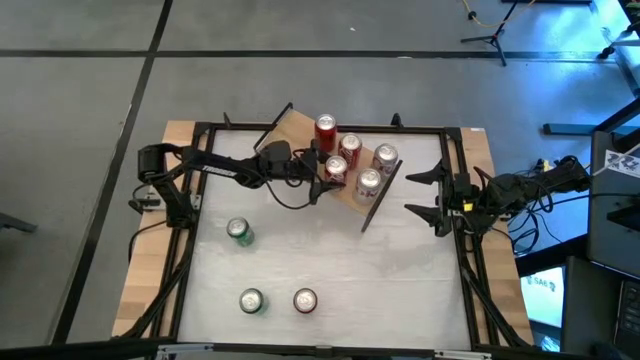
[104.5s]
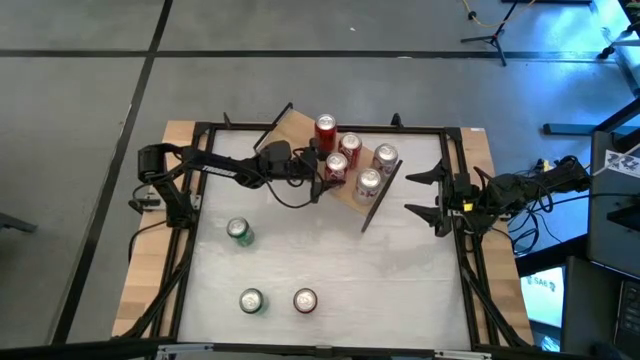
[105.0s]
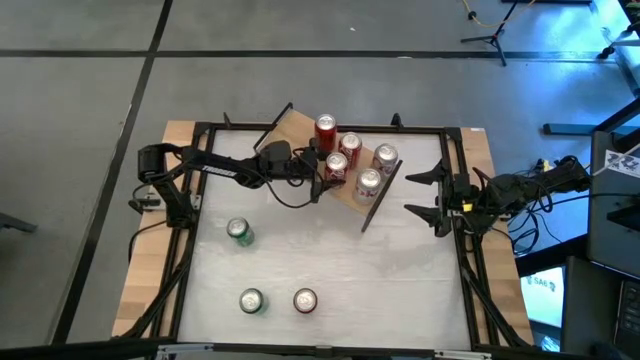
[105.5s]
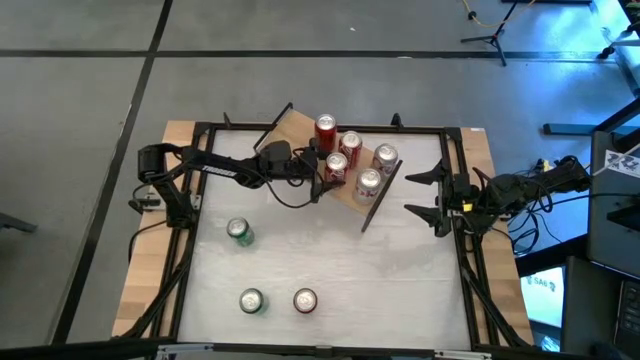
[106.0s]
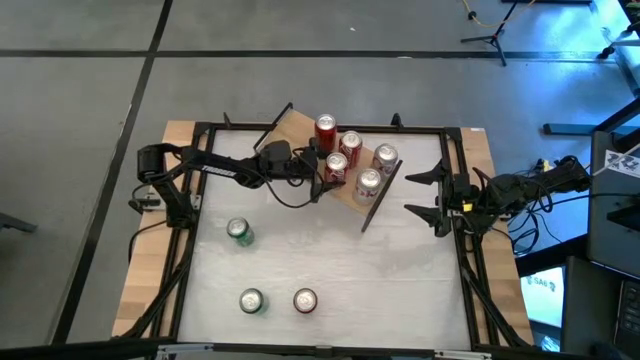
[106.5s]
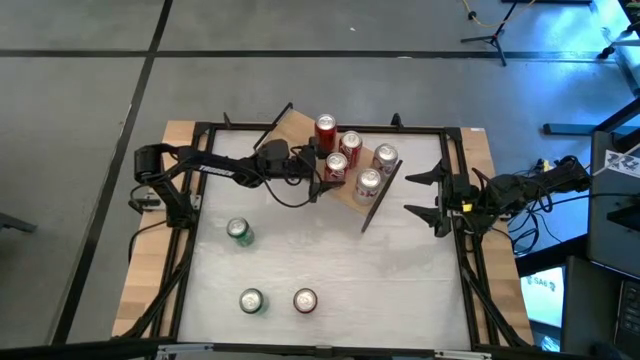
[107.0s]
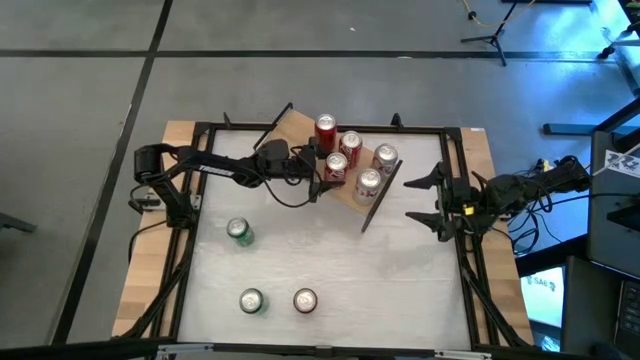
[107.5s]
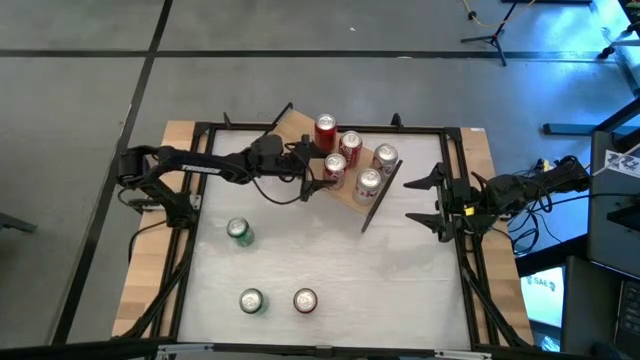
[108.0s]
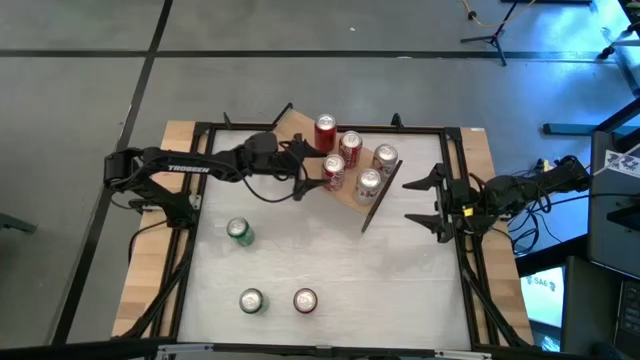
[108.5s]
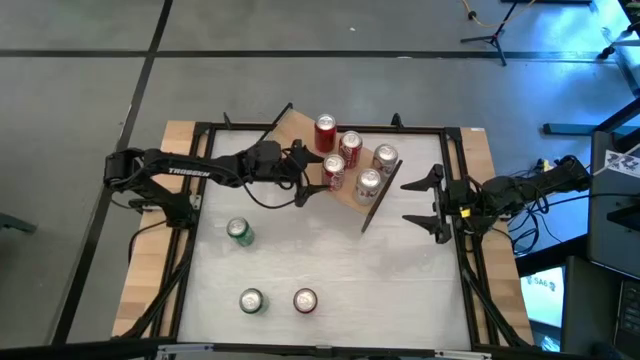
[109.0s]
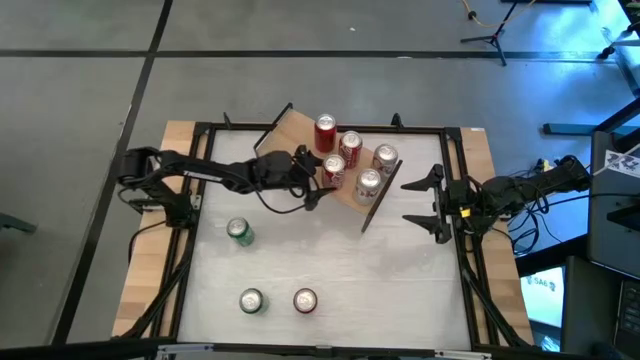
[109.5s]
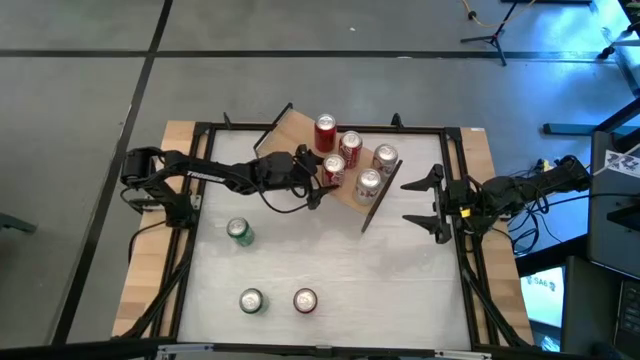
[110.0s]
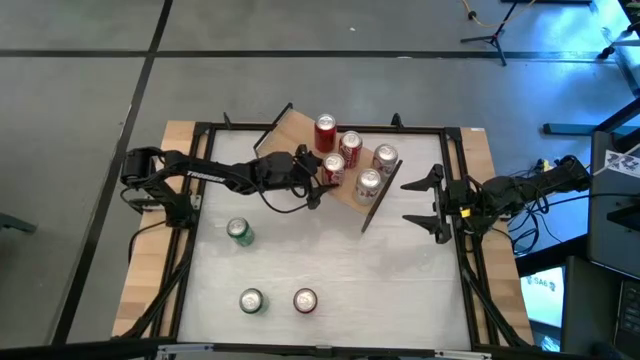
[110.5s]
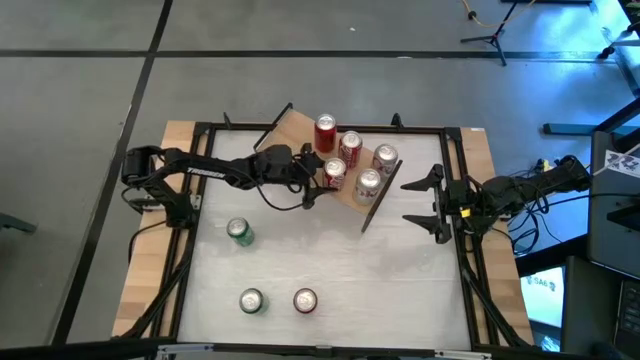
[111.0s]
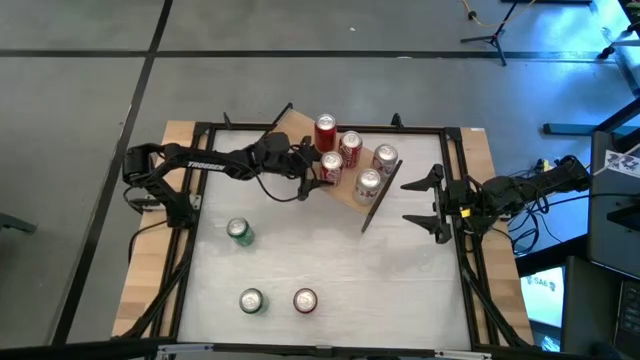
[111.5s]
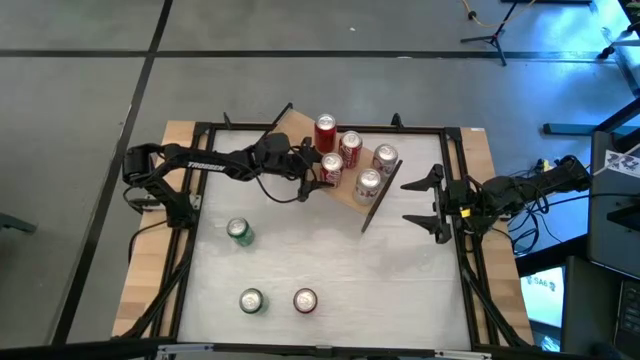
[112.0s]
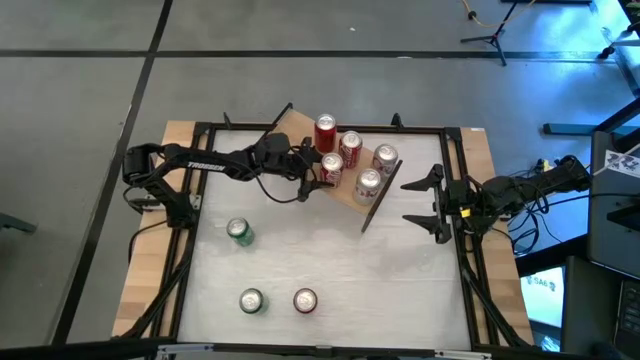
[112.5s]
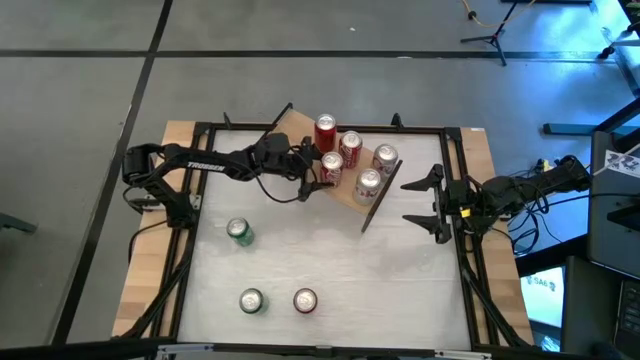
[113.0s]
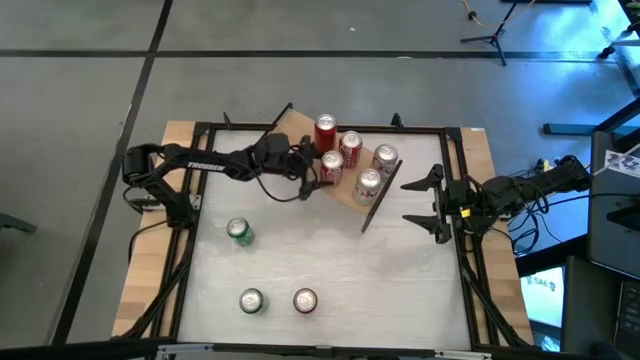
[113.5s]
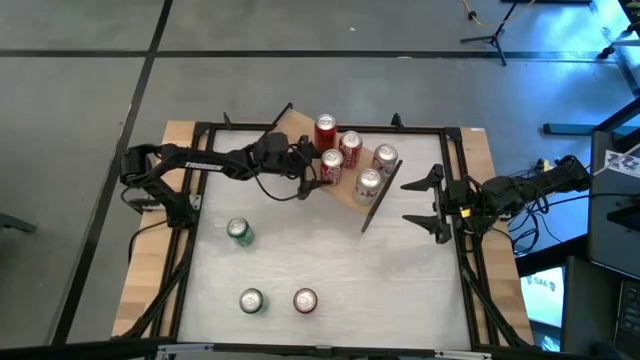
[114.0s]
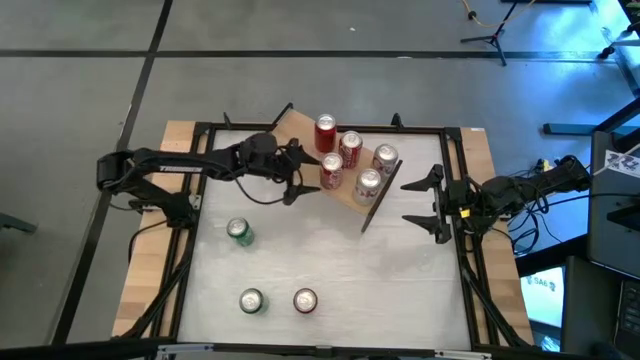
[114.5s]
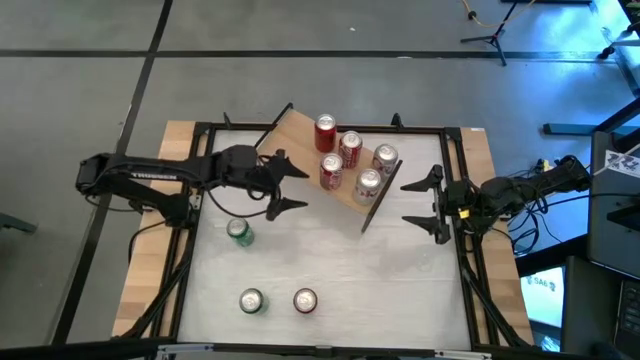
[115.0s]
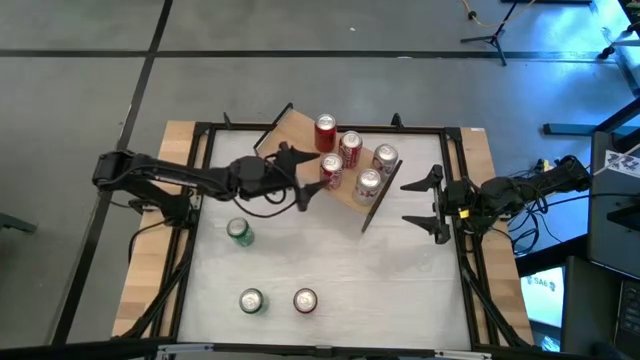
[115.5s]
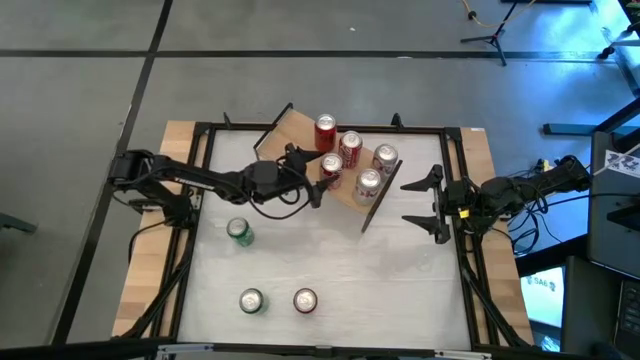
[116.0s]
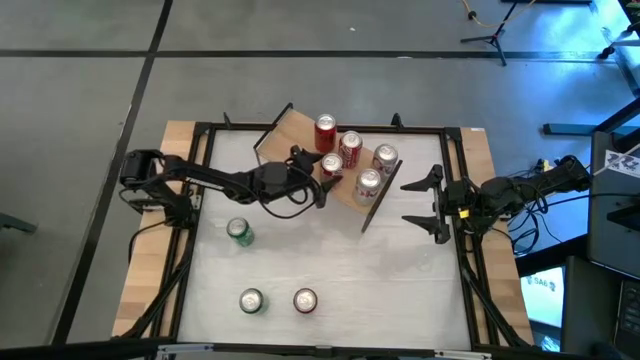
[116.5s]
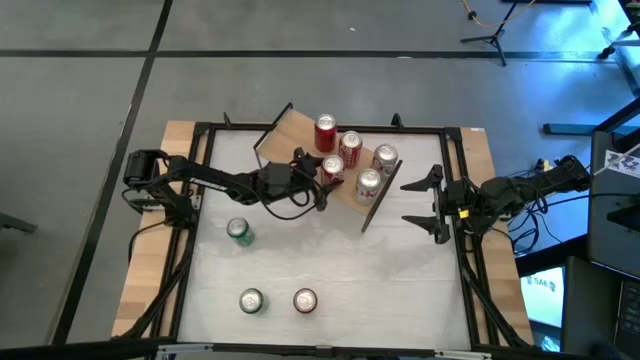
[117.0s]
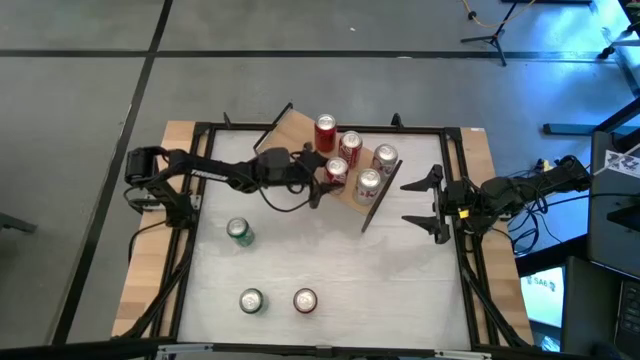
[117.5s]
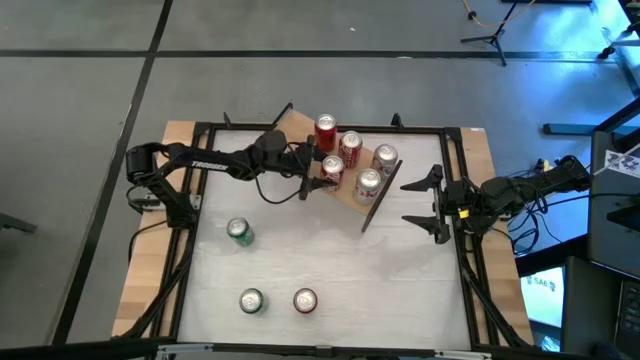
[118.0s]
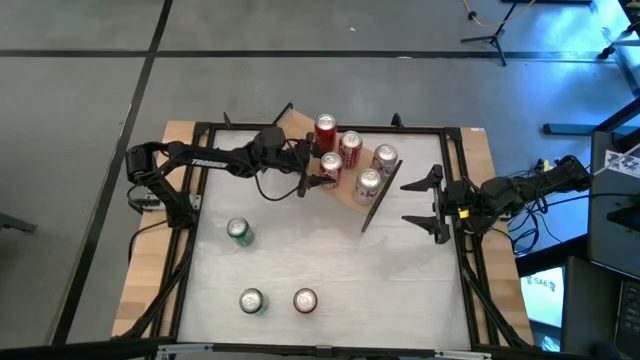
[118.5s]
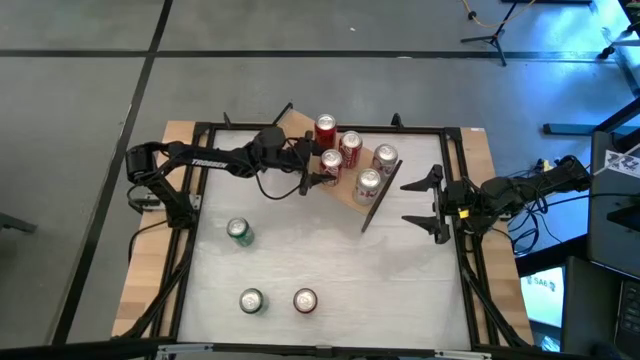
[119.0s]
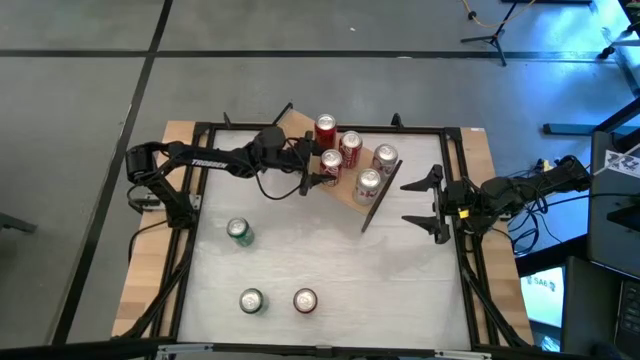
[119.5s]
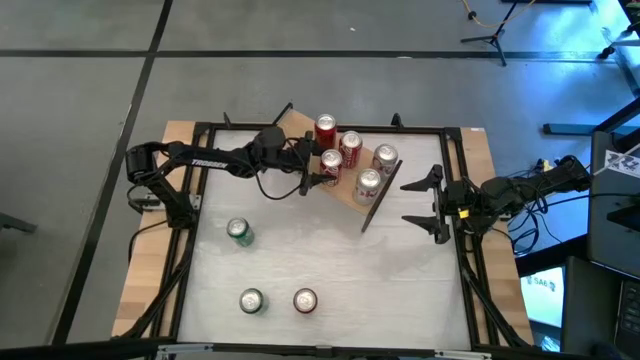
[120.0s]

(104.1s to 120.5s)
Task: Place canned beverage on shelf
Put the red-white soda can on the shelf aligned with the other red-white soda cans

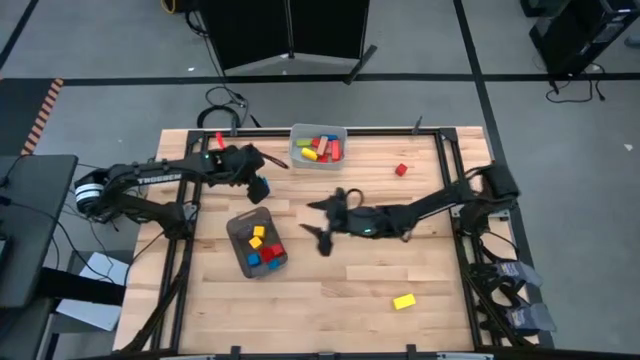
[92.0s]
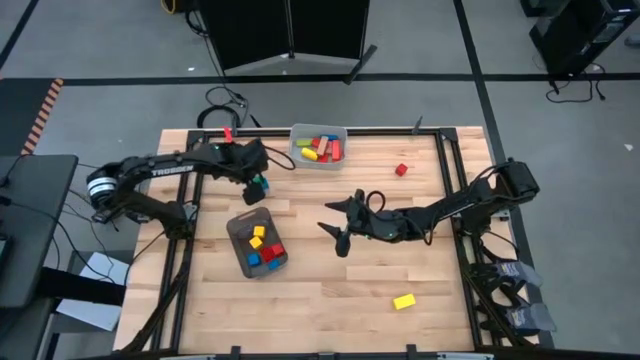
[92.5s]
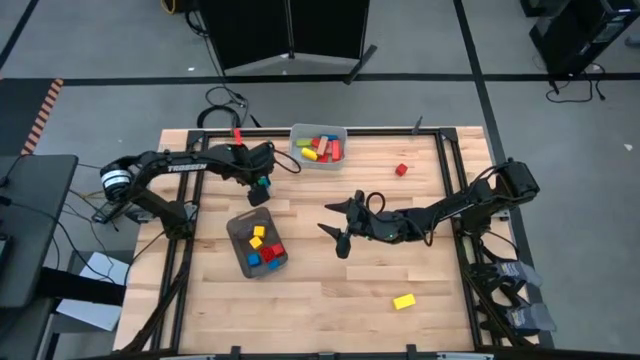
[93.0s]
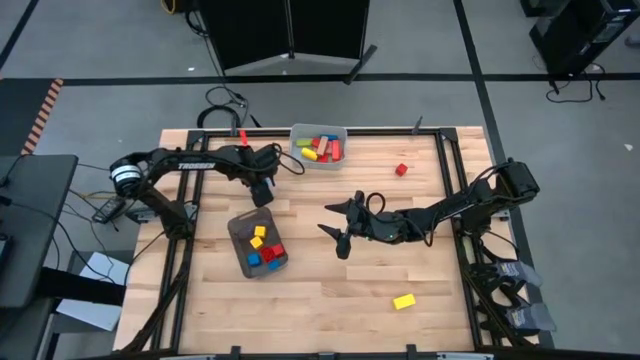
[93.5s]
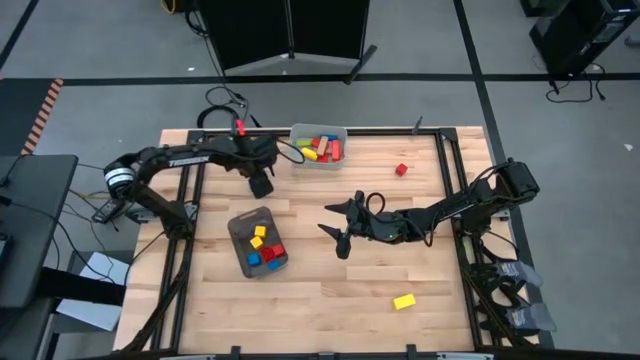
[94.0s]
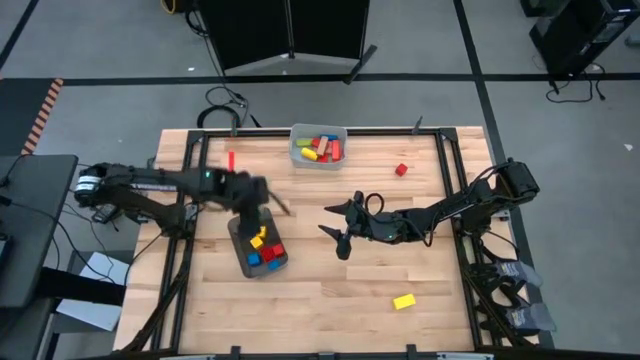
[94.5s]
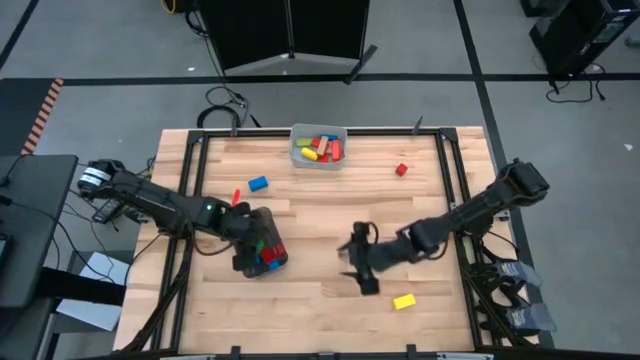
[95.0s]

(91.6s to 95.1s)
Task: Sort blocks by size
Put the green square block into the black bin

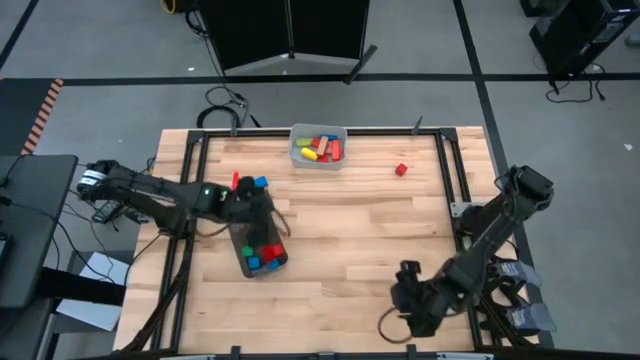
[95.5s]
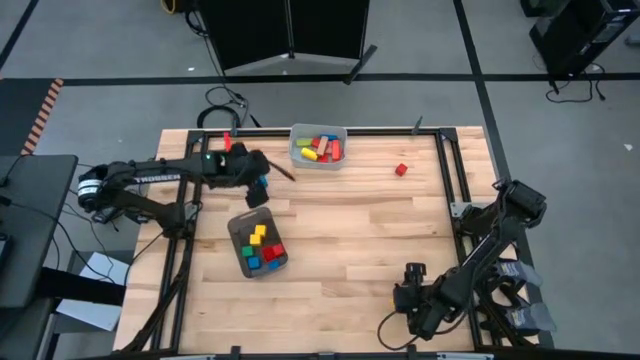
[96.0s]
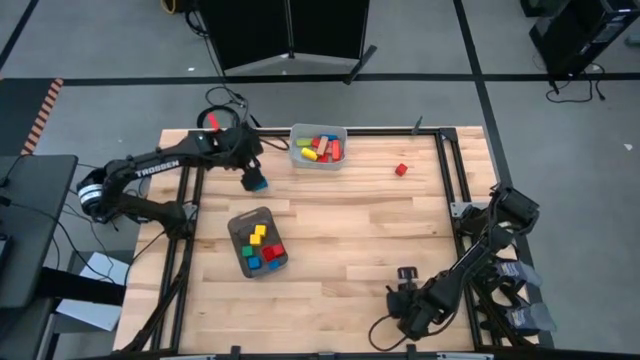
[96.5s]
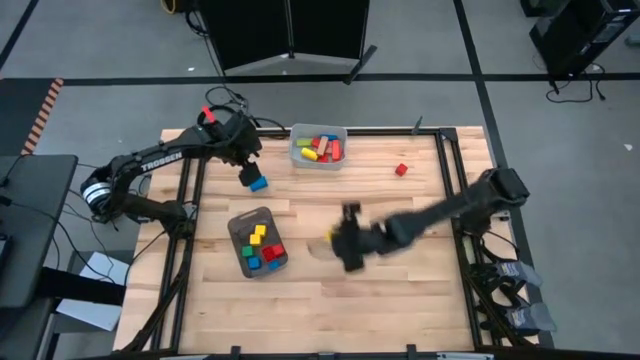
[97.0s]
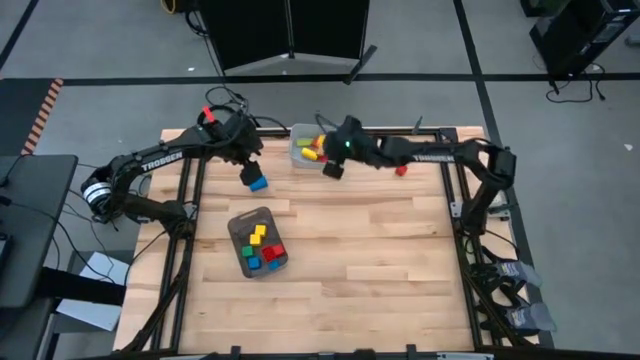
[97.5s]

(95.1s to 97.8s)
Put the yellow block into the gray bin
